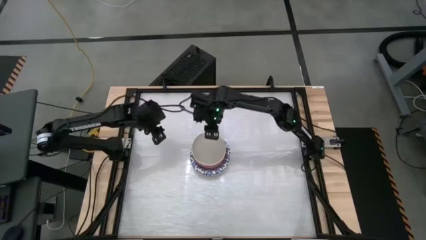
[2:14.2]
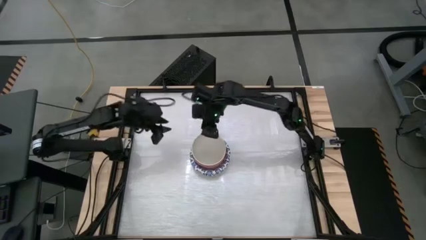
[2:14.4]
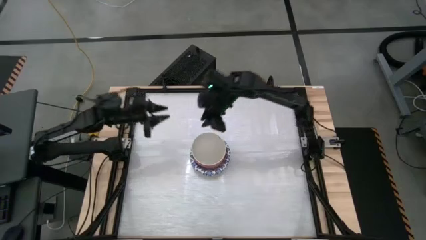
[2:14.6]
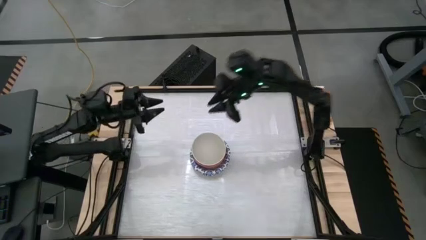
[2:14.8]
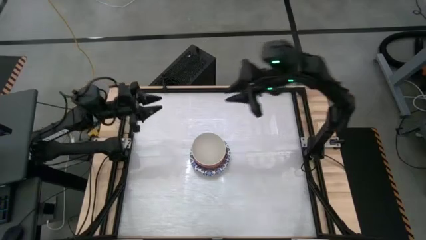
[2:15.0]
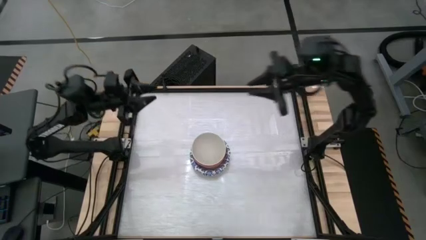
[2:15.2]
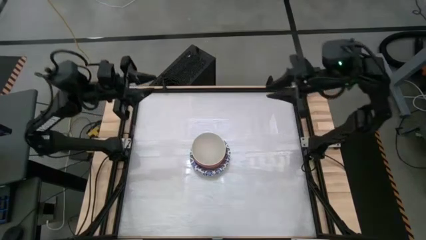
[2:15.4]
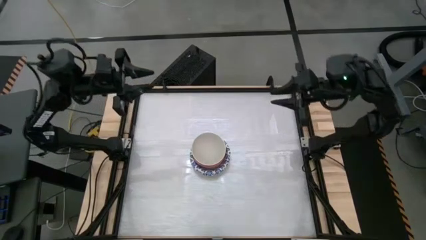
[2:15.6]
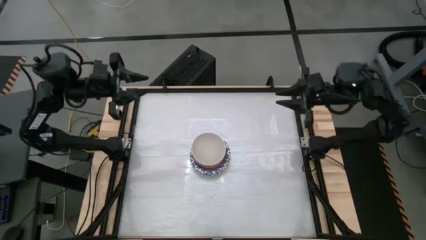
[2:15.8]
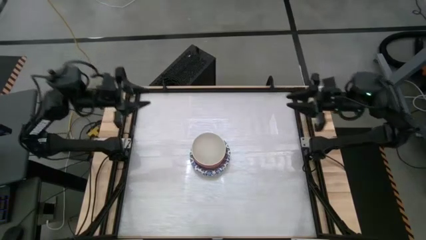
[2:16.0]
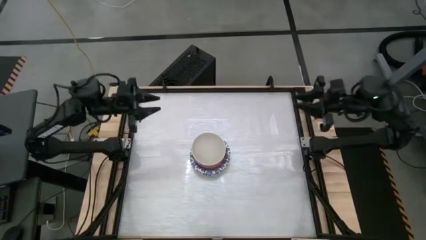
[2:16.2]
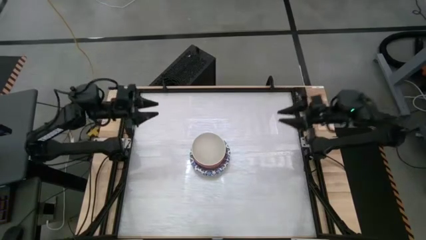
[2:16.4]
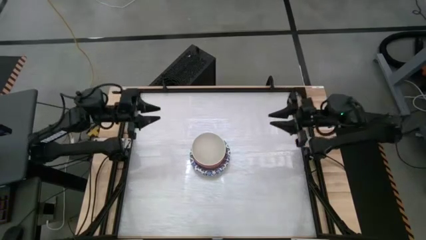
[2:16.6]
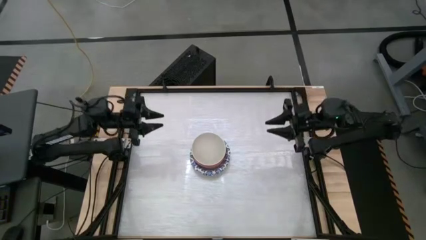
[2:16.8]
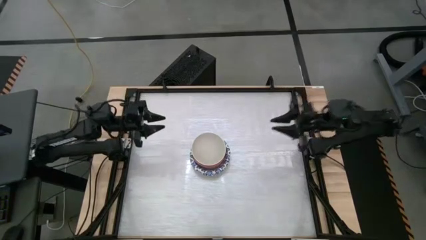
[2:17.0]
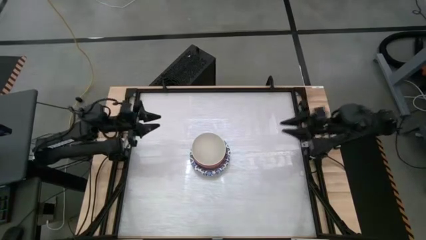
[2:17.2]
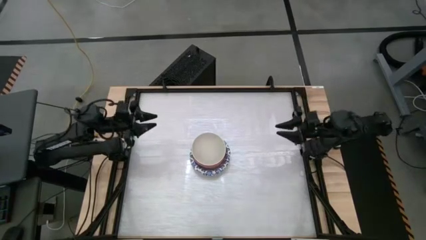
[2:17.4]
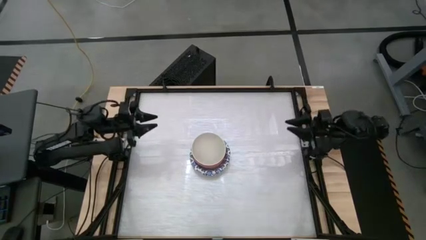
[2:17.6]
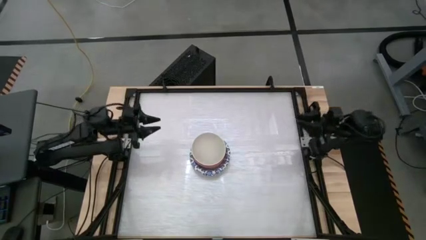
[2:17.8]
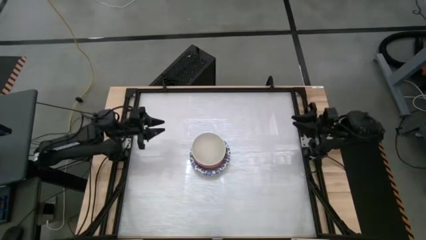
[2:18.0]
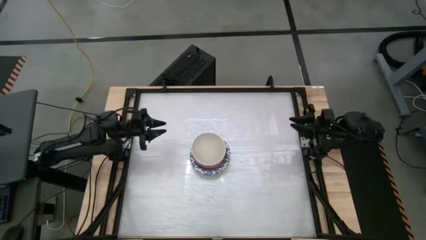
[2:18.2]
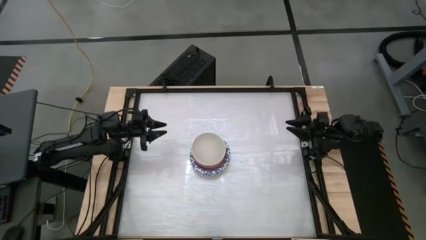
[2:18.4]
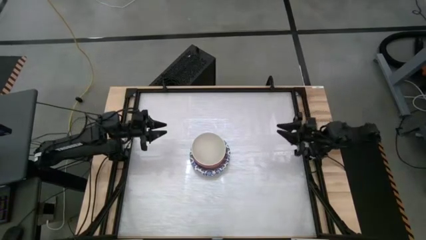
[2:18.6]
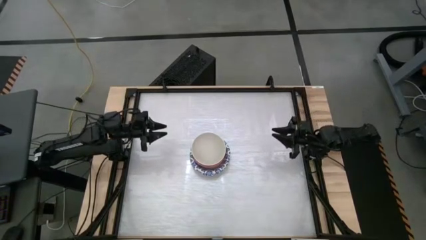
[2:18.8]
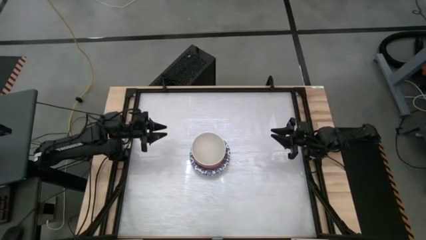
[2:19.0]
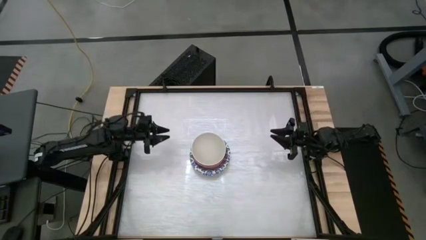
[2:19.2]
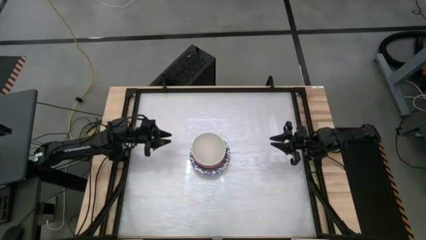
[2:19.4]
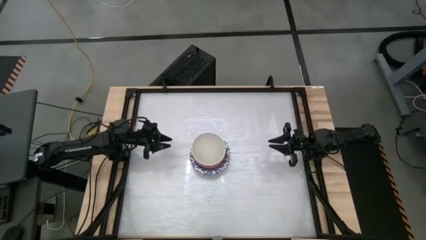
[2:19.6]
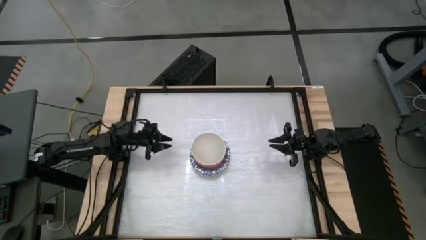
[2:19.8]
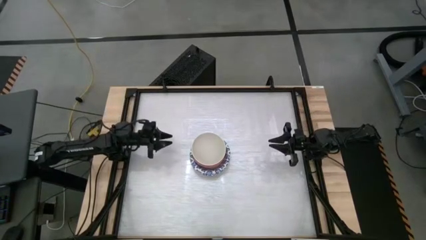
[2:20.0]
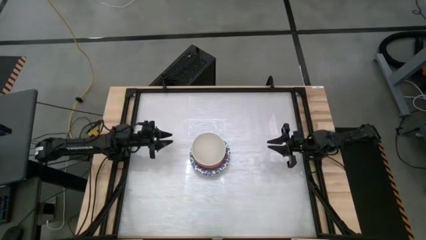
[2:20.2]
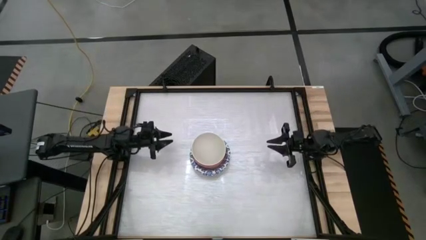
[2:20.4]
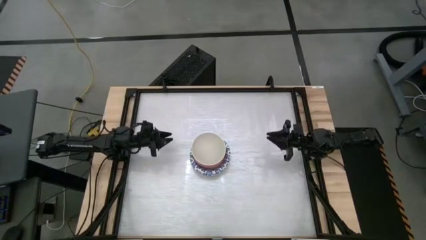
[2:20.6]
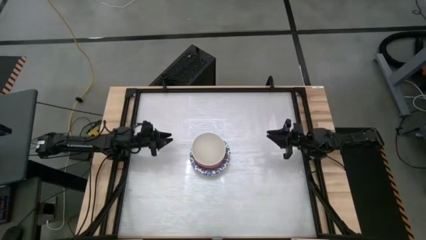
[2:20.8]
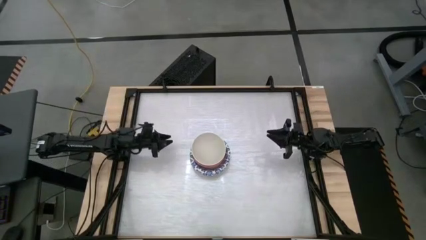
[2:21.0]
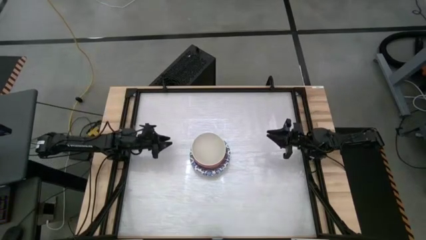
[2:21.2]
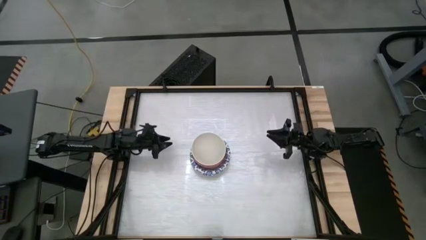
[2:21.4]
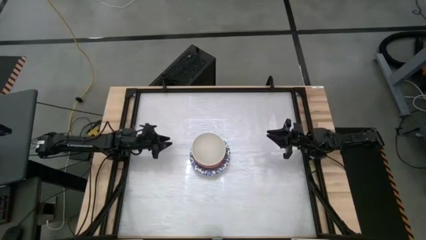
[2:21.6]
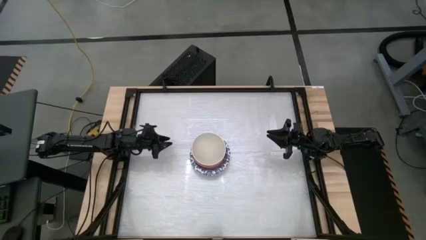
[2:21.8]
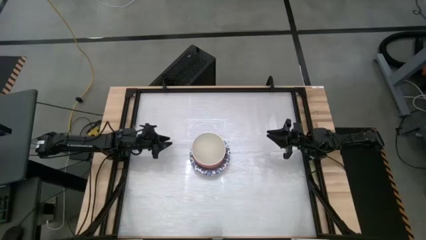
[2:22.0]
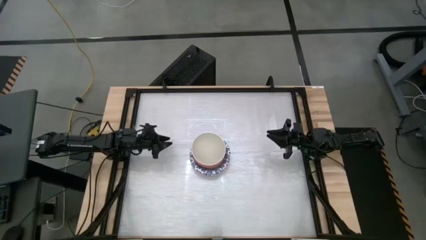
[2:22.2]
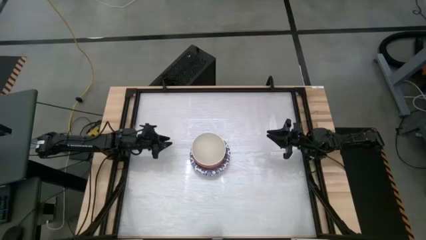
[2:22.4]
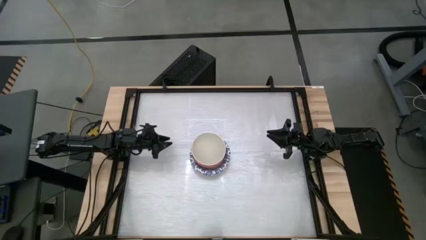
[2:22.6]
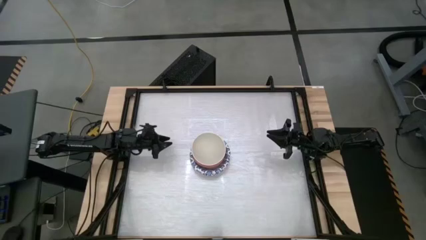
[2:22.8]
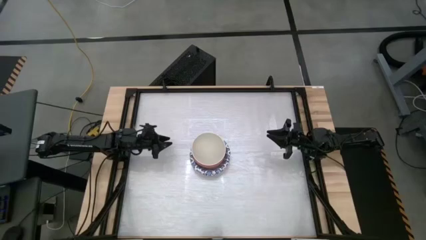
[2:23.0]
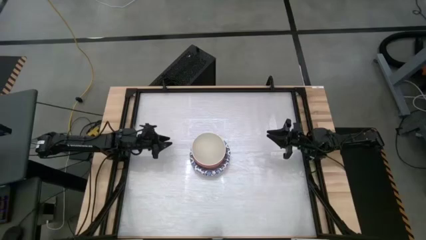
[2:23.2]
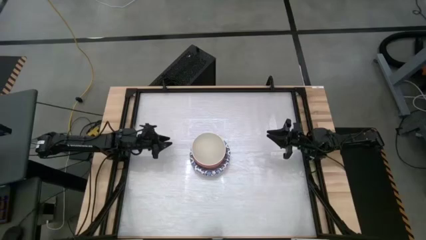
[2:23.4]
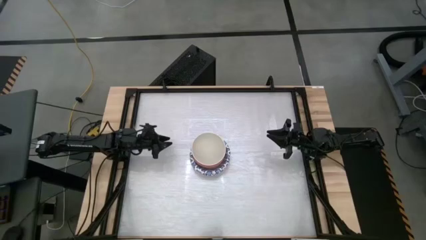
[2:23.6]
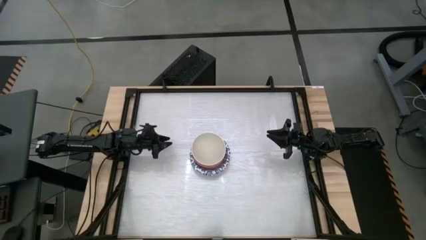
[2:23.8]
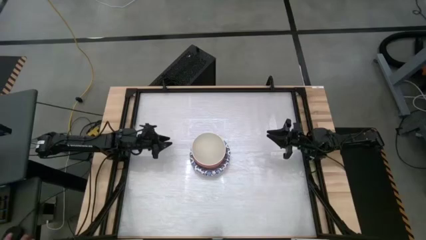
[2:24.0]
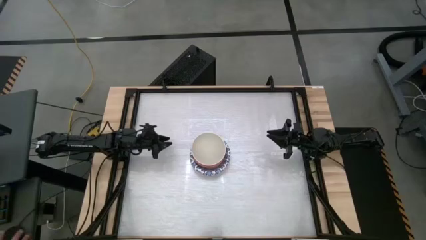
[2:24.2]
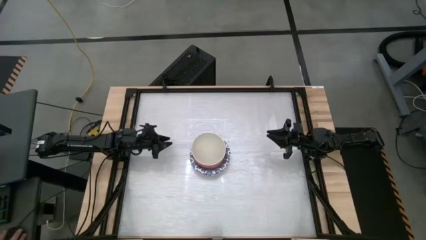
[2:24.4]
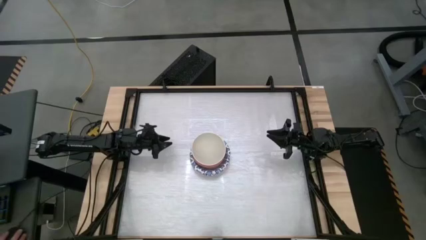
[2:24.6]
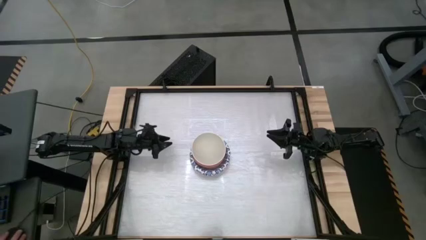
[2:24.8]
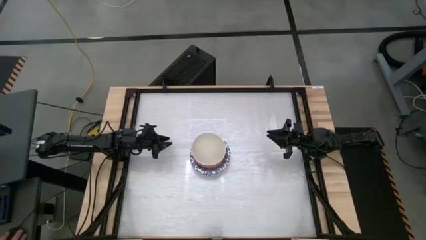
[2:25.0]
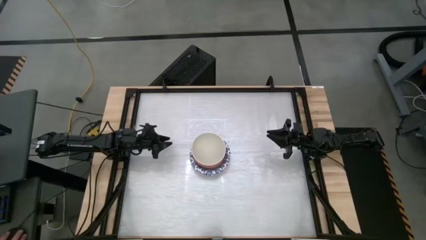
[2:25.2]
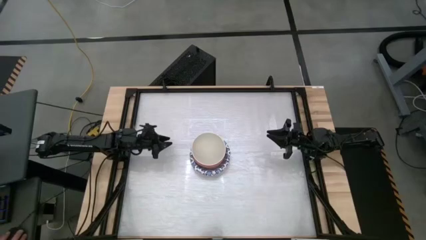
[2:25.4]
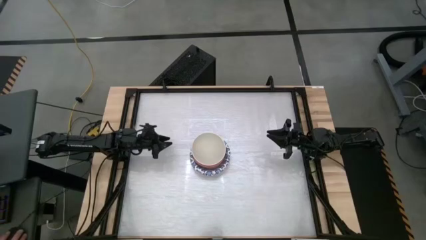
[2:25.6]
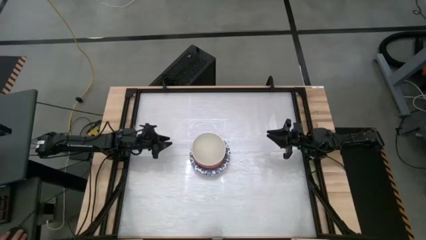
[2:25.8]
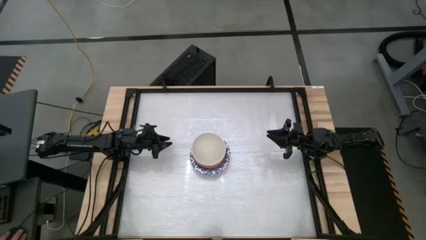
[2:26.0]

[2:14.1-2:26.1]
Task: Nest bowls inside each other by size order
Return to Home Position

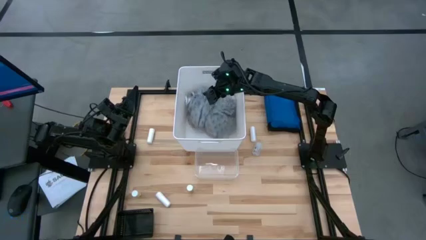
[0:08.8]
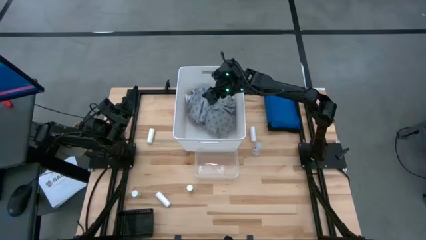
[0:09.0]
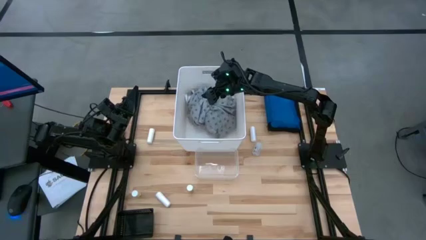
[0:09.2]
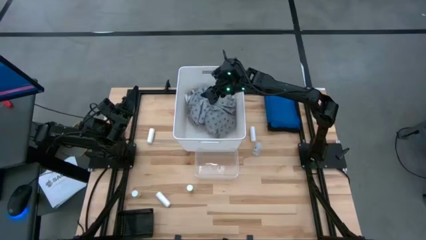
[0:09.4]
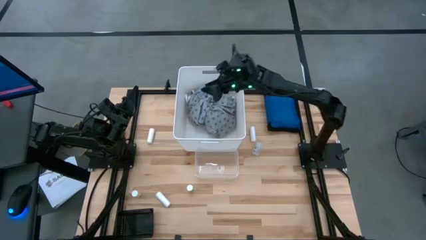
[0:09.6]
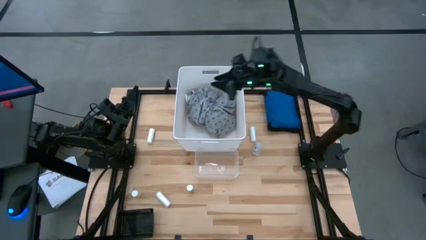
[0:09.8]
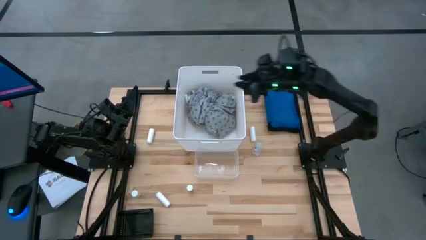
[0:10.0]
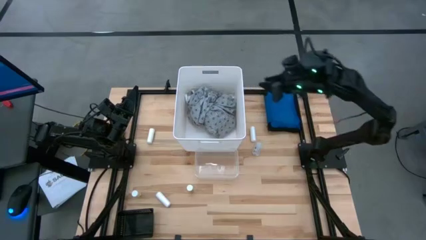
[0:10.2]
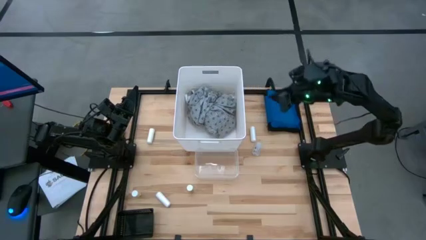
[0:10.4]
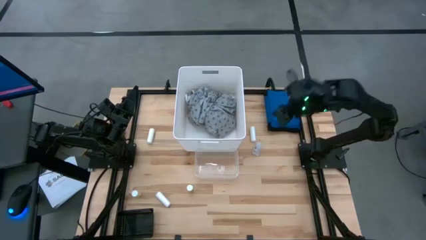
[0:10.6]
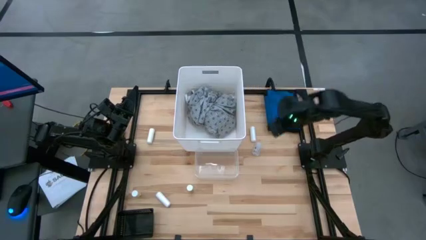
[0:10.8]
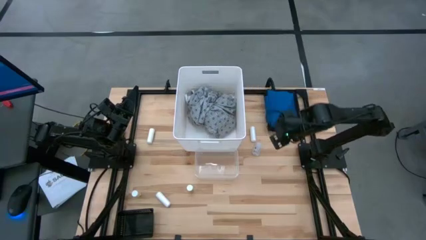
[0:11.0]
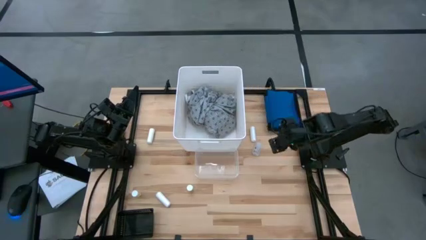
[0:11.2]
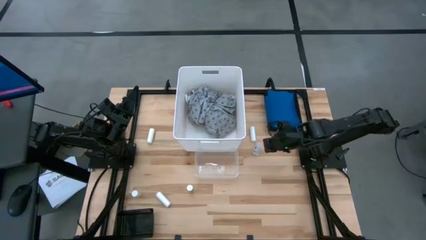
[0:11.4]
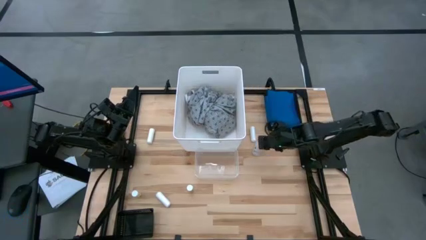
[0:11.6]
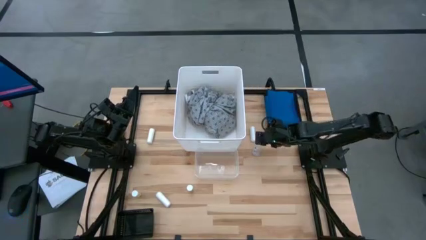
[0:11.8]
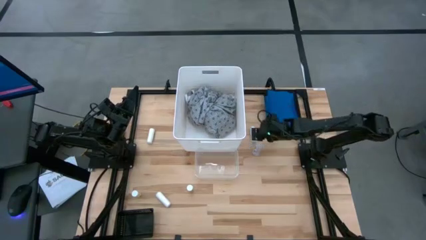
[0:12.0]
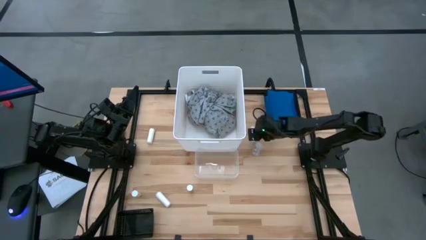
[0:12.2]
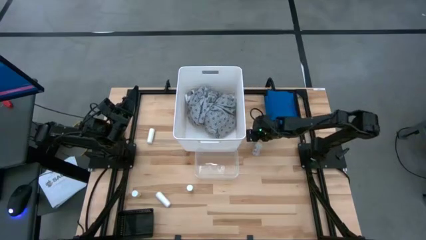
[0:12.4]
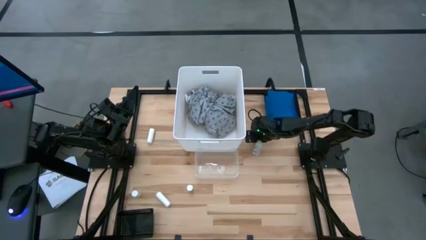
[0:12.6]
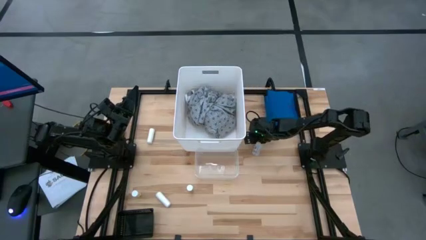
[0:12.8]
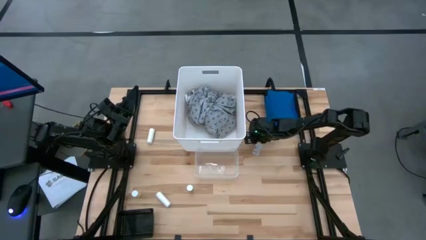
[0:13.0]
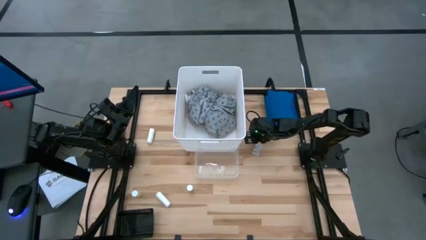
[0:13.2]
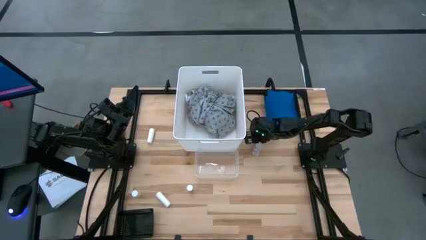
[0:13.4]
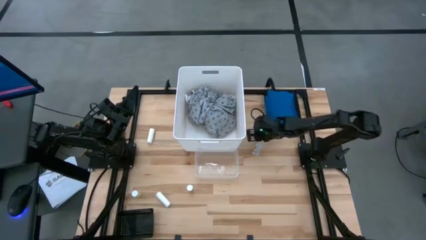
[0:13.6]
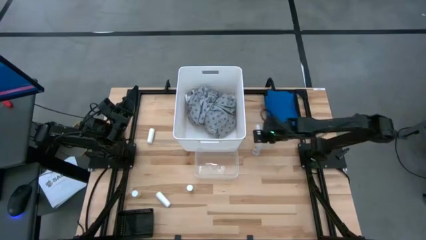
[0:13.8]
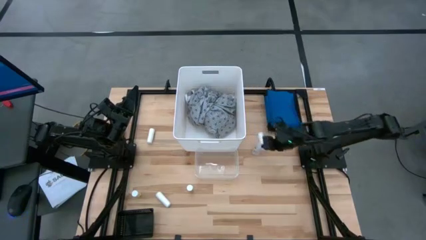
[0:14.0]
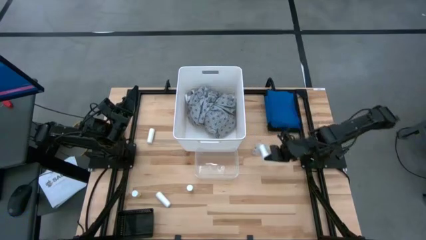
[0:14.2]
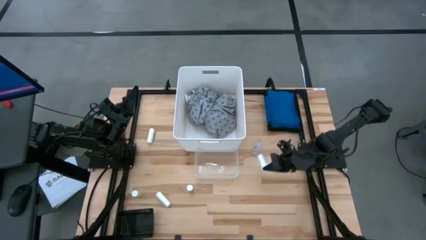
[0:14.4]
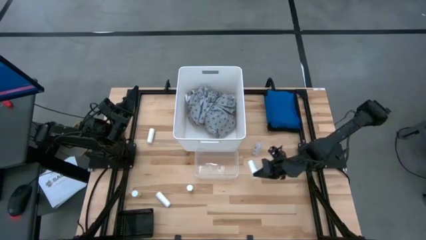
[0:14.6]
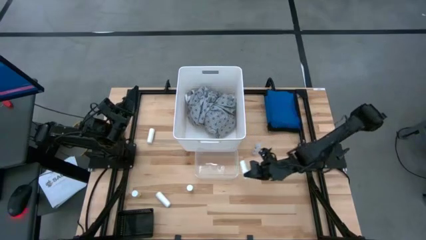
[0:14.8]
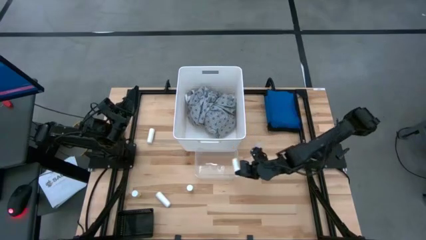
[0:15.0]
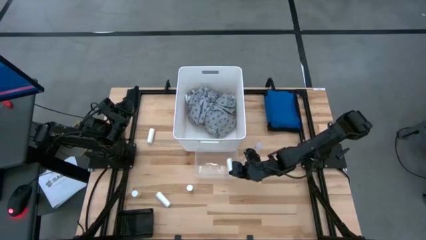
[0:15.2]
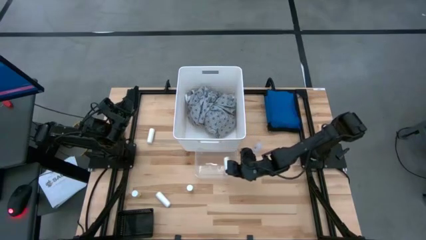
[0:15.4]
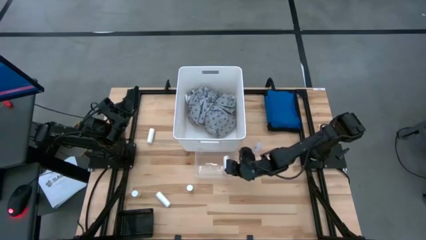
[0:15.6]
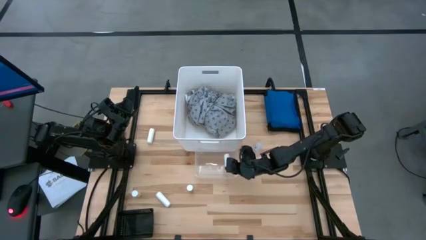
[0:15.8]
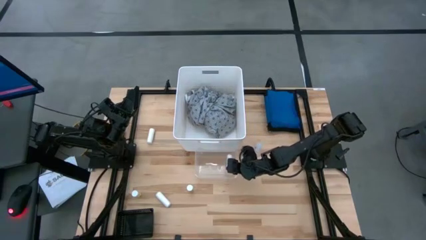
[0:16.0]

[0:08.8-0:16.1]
Task: Pick & Place Medicine items
Put the right rolled gauze into the transparent bin
